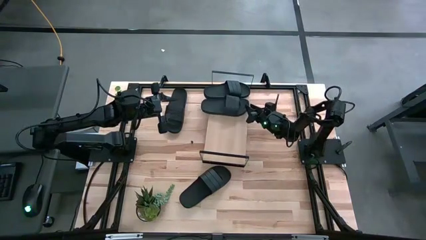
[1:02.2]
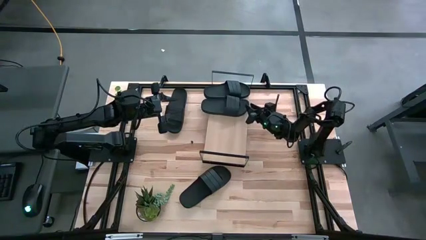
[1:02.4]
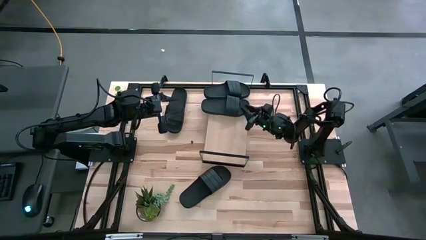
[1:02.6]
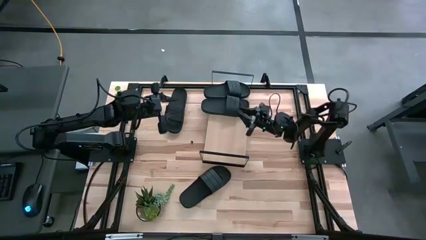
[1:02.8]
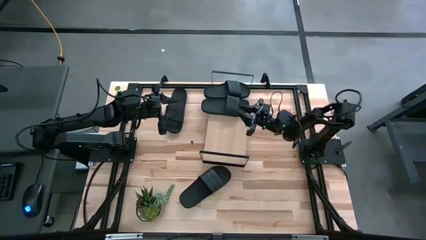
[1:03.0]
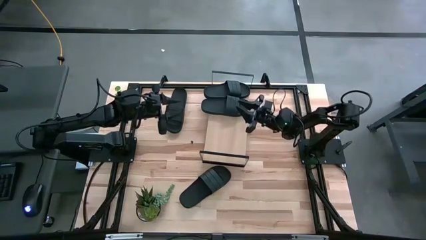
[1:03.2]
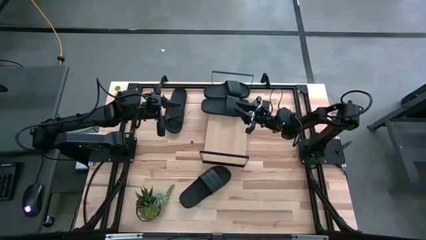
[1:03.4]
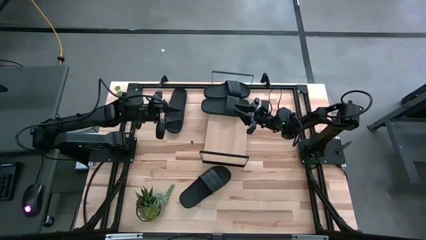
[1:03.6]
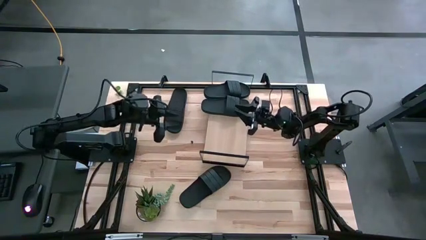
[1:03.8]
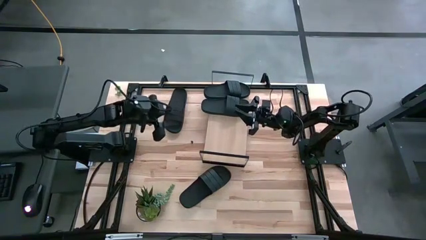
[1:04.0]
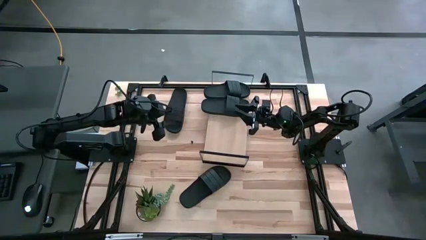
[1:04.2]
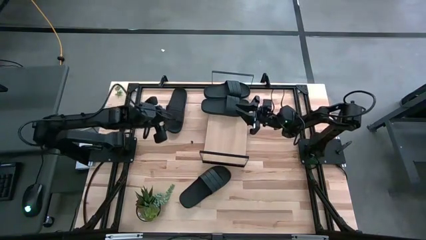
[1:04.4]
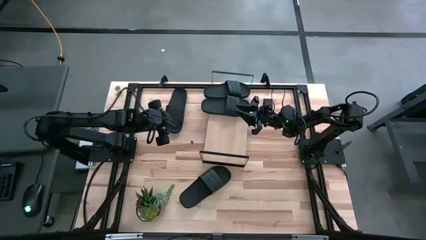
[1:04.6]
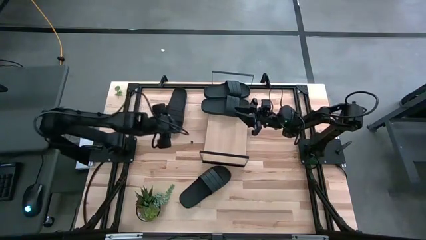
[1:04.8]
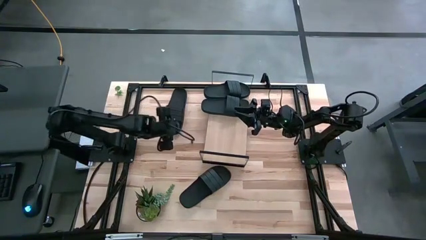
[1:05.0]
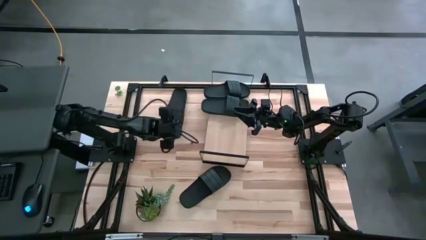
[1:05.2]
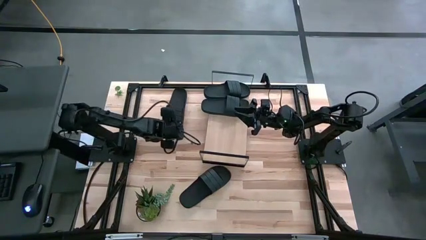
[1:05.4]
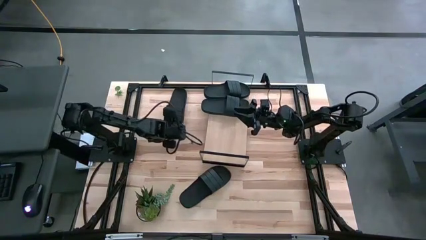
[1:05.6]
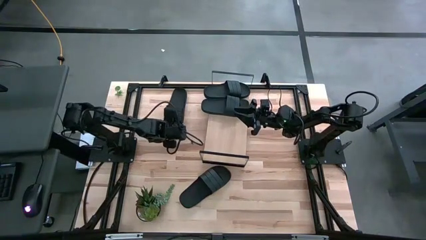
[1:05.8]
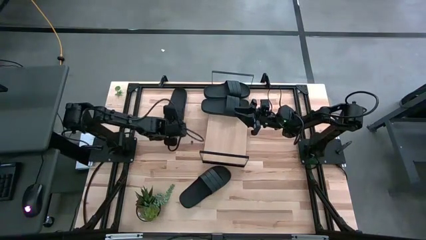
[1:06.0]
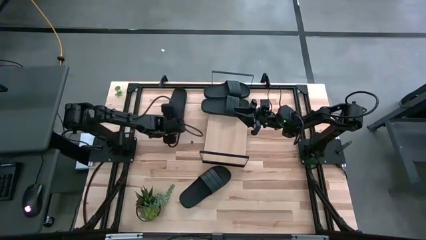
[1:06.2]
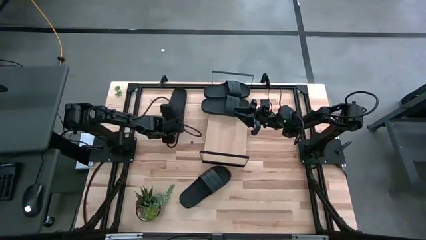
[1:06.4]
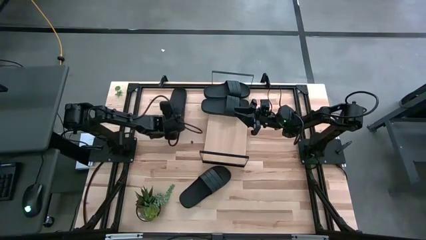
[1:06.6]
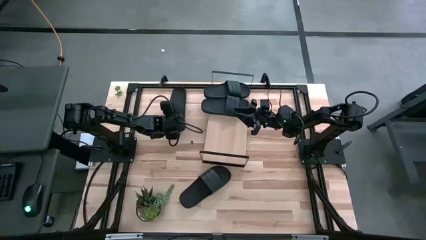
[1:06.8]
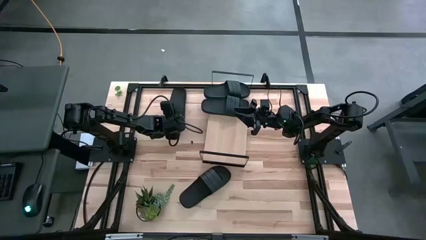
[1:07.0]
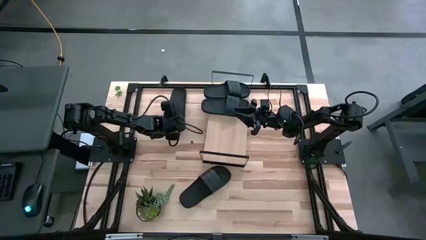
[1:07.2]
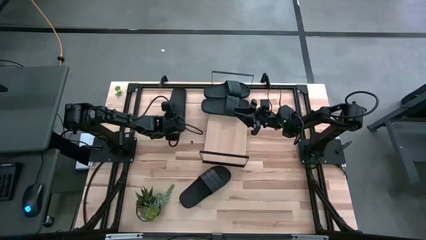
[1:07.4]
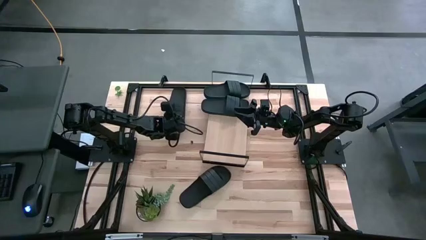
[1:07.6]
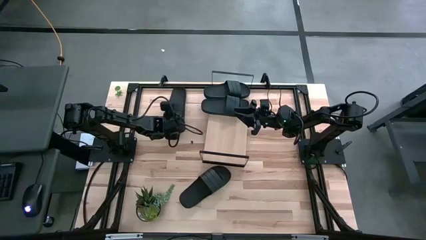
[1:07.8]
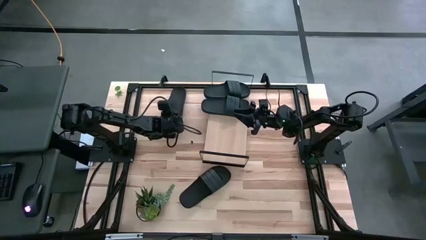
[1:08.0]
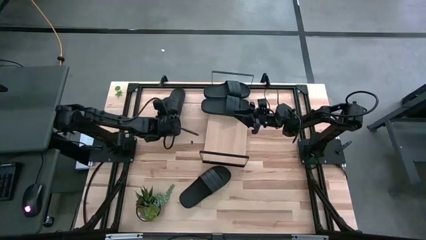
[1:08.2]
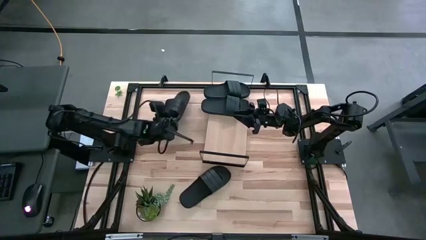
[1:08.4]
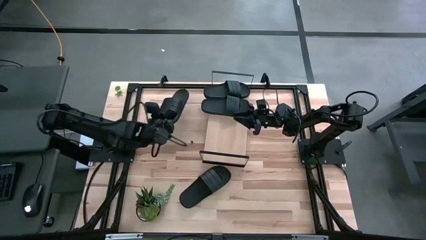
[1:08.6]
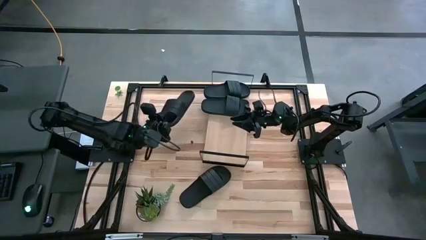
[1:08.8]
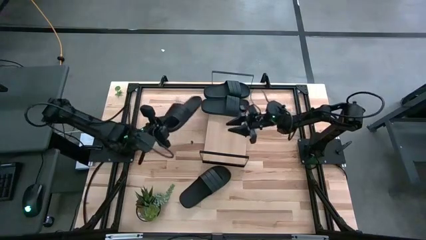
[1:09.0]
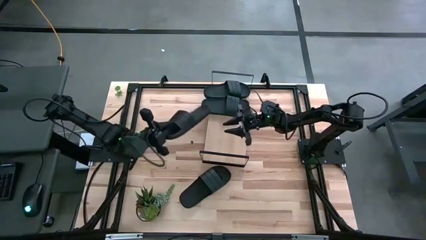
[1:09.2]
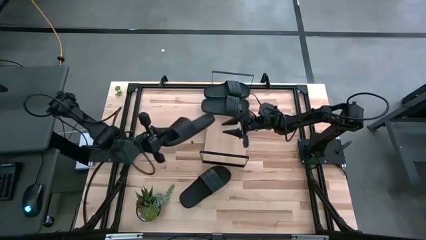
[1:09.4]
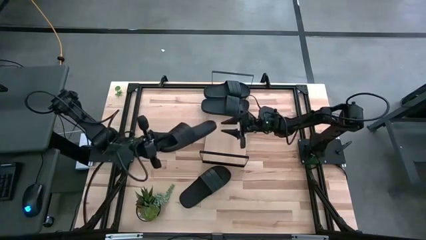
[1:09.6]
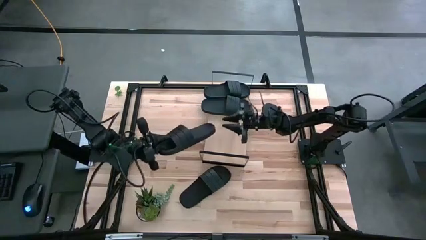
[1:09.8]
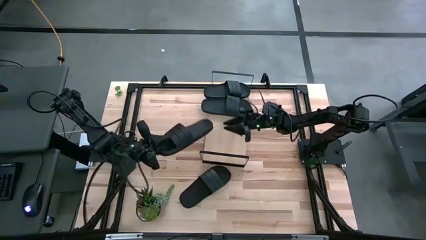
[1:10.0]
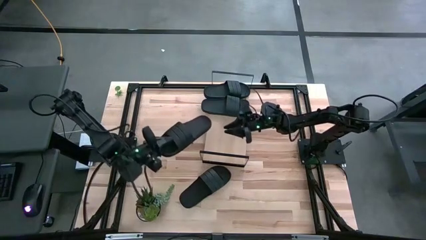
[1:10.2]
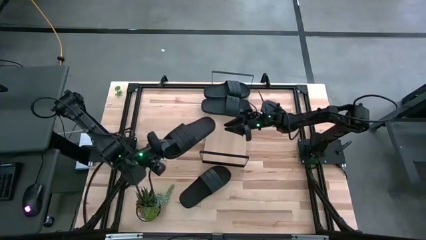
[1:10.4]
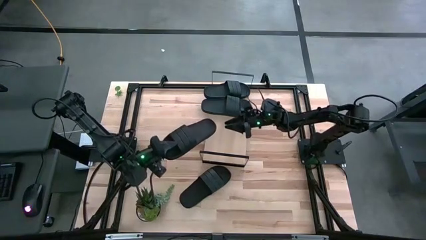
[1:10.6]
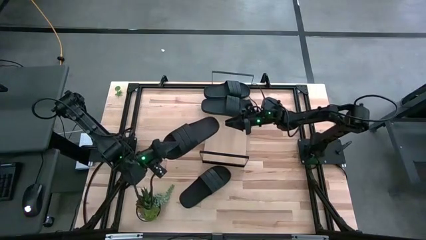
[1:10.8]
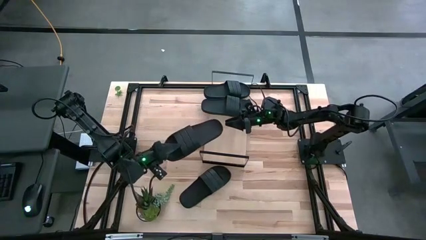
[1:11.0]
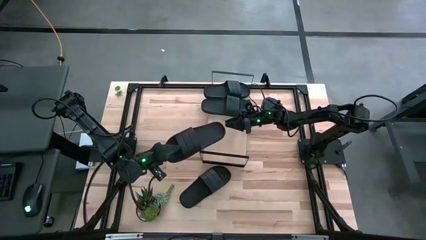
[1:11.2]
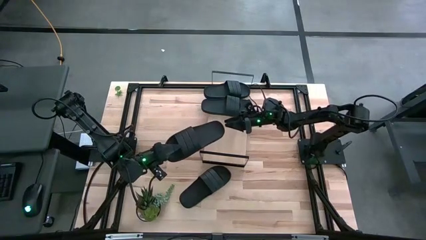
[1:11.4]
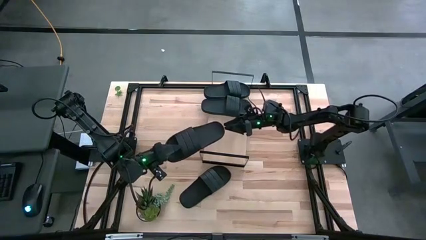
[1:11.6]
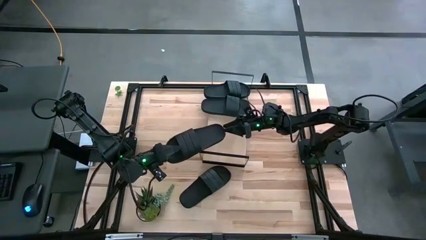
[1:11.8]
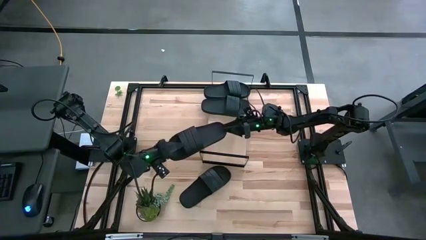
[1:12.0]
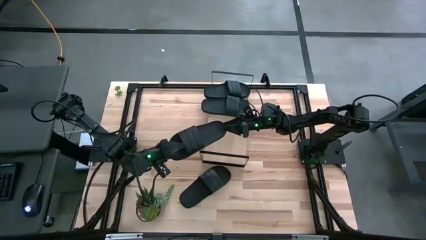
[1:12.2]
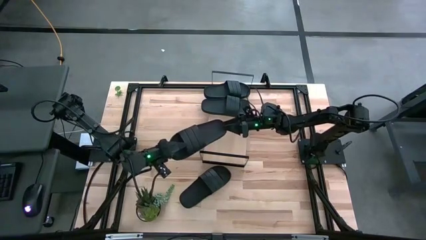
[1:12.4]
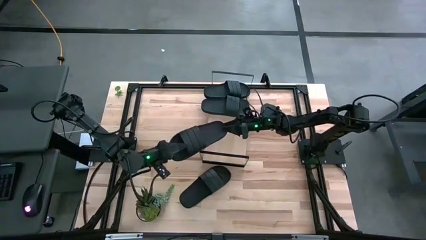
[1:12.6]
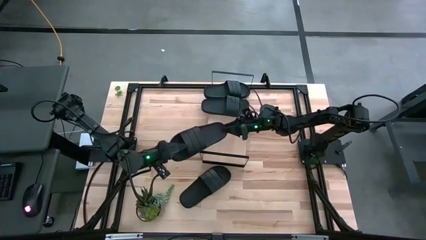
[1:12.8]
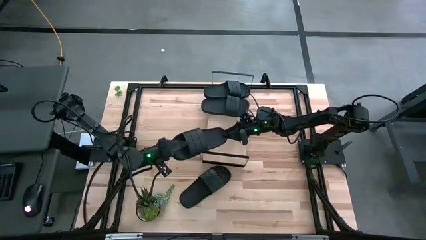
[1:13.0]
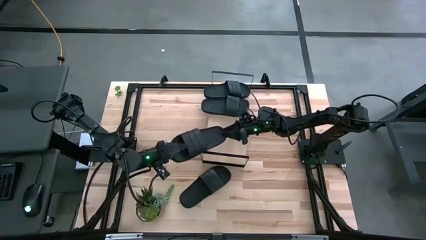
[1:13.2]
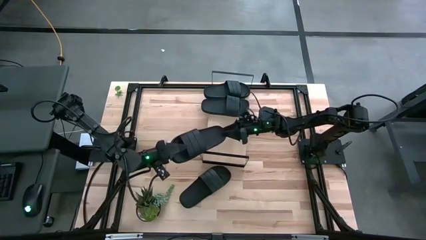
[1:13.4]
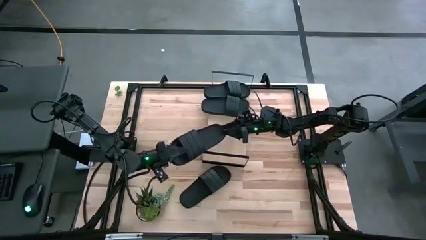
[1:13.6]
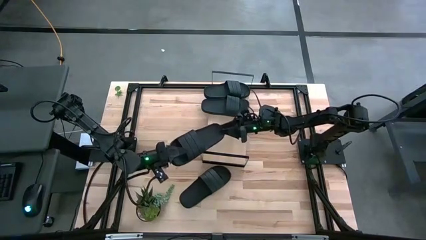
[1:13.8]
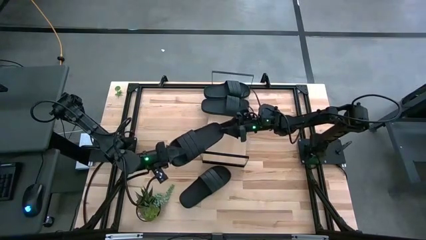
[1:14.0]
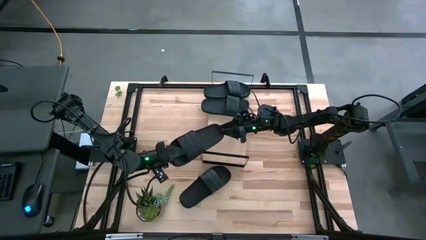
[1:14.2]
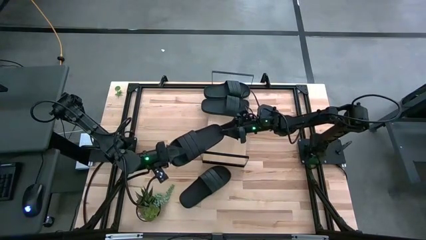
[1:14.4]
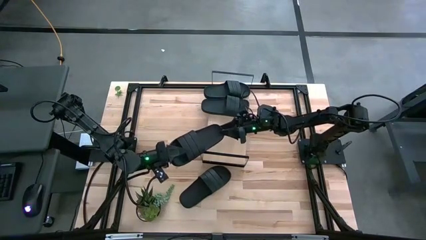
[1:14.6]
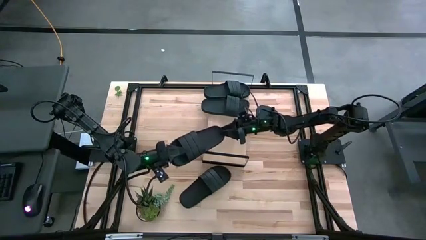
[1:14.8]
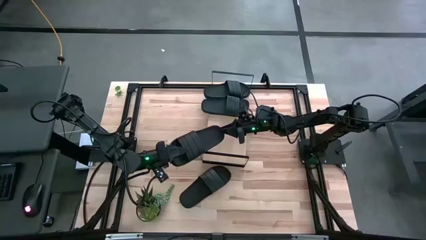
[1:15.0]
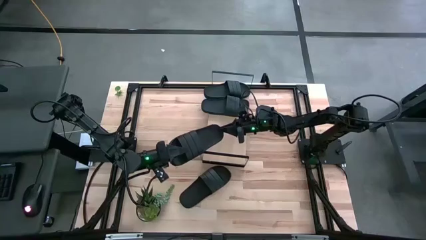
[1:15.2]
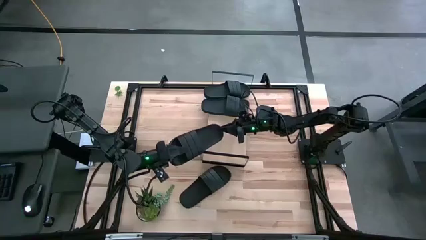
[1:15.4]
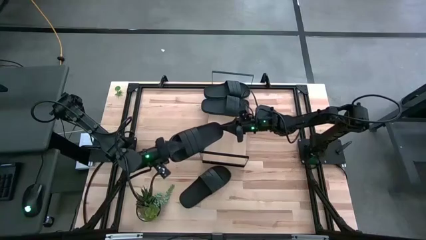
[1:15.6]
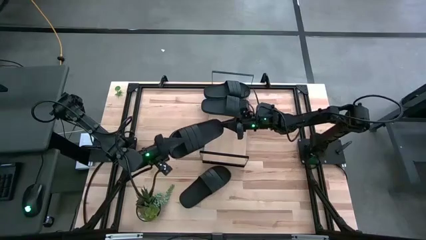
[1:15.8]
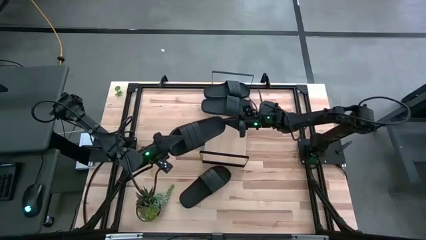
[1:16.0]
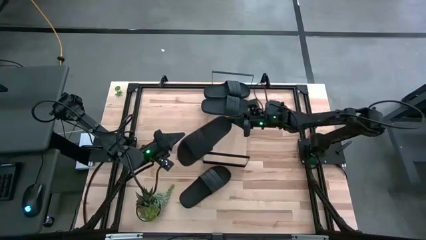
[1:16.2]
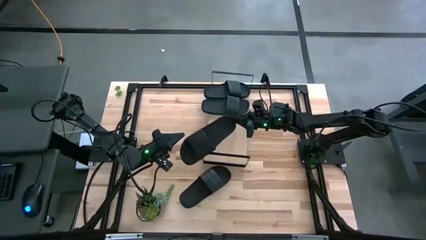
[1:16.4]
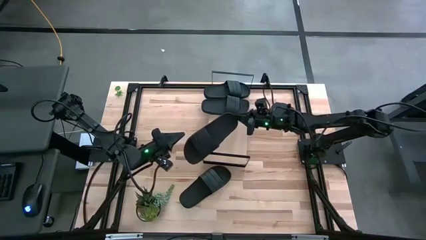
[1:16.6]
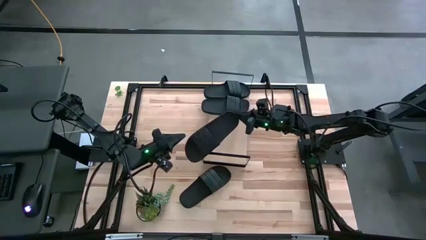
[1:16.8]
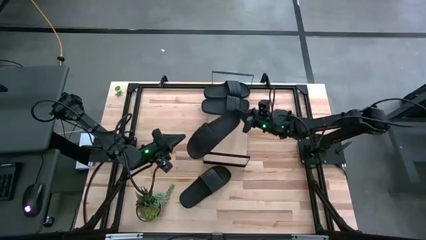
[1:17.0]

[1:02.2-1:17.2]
Task: Pick and place slides into the shelf
Put the top black slide on the shelf

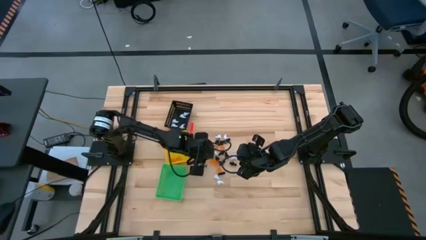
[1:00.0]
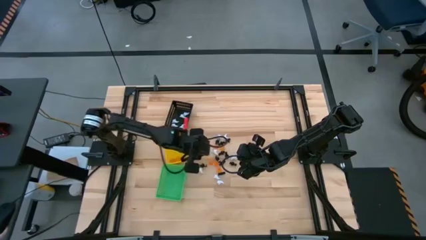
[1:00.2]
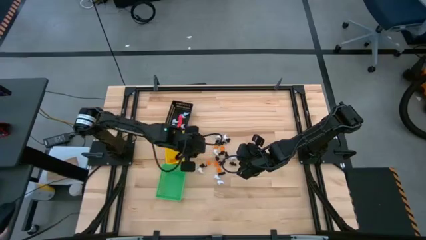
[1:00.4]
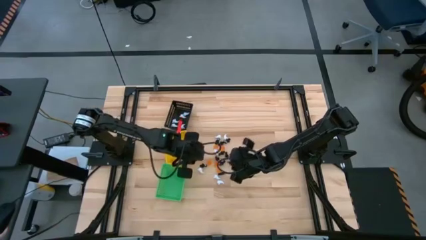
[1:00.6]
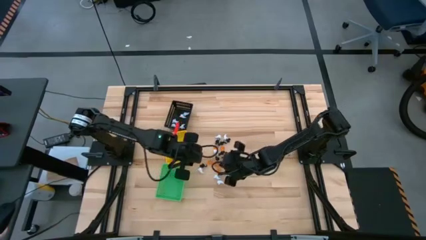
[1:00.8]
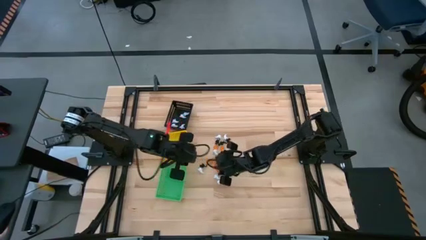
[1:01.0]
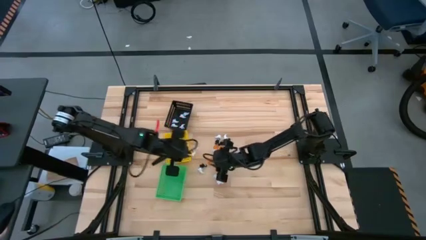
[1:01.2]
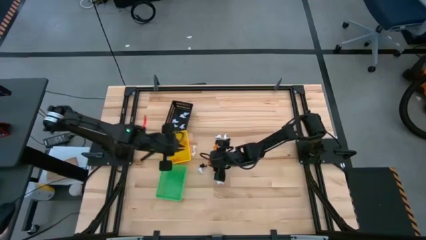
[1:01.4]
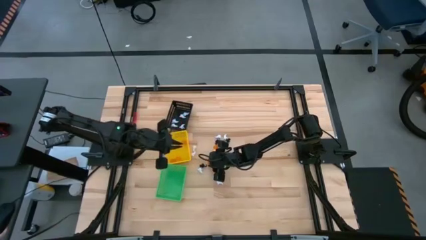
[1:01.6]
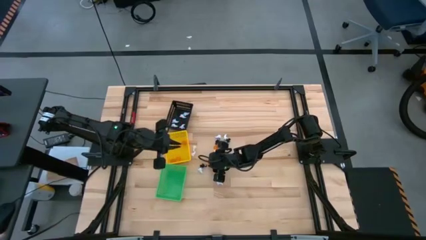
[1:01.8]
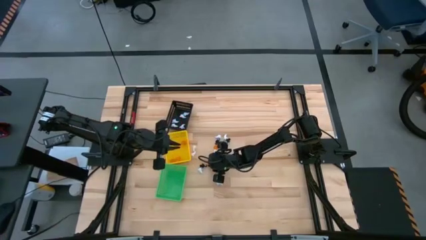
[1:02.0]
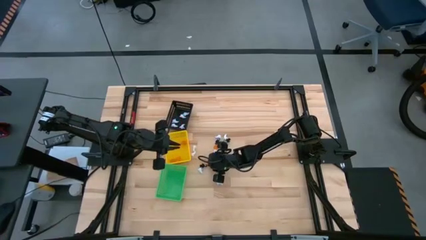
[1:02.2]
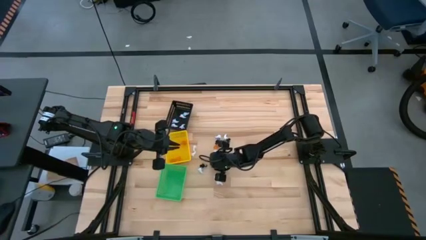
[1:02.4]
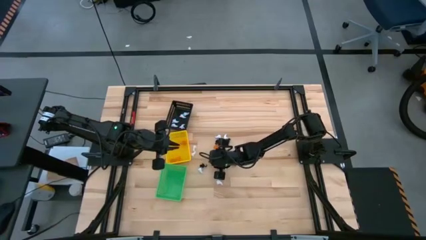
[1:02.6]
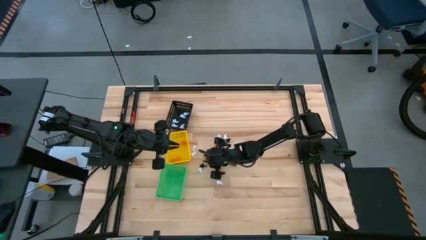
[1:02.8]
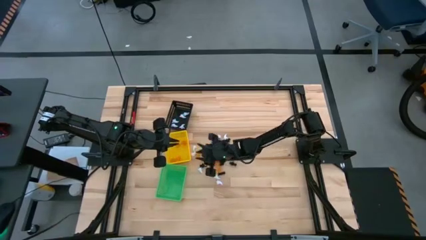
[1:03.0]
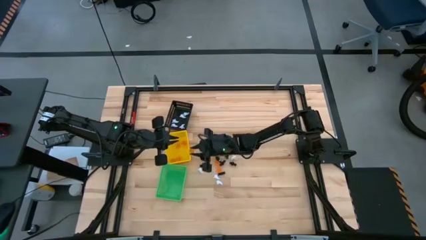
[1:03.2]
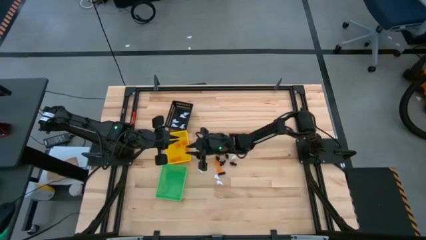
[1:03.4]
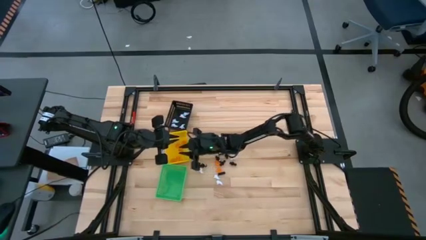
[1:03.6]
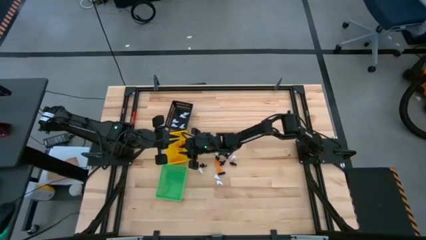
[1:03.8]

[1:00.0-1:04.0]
Task: Sort Halloween decoration
Put the orange pumpkin toy into the yellow basket
